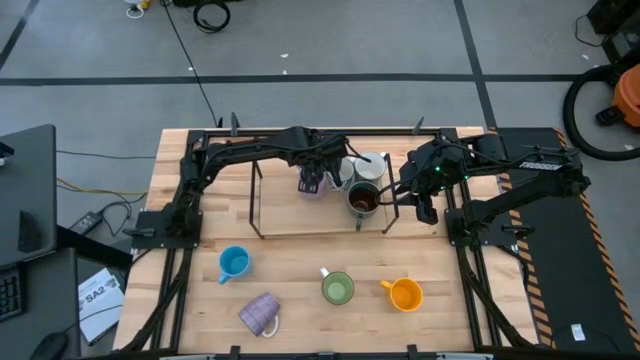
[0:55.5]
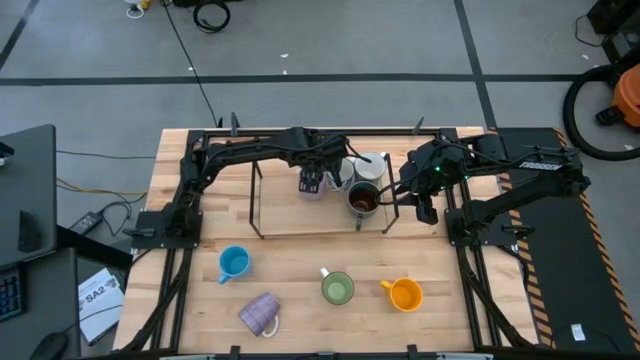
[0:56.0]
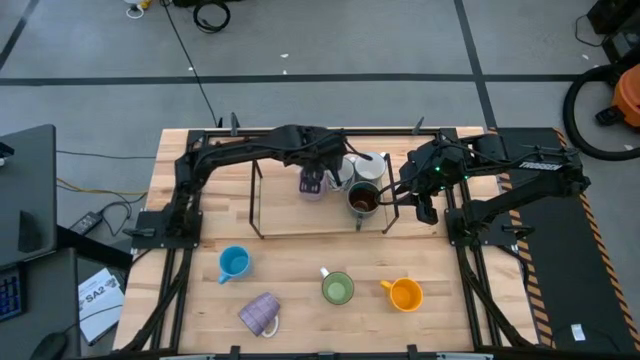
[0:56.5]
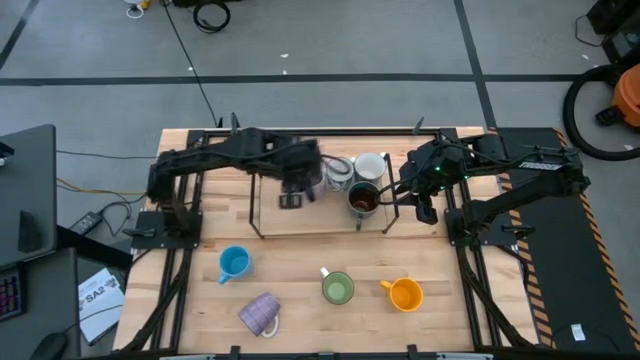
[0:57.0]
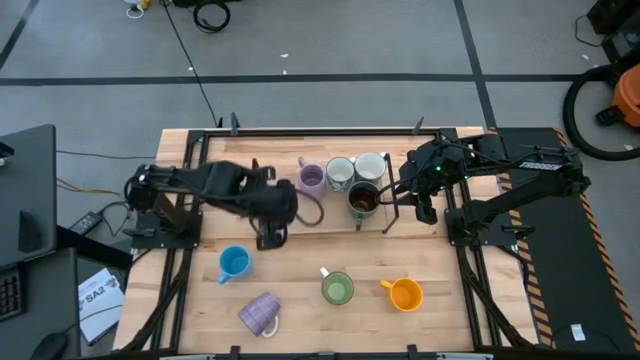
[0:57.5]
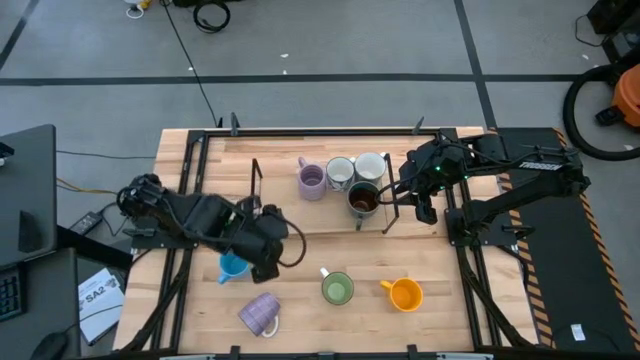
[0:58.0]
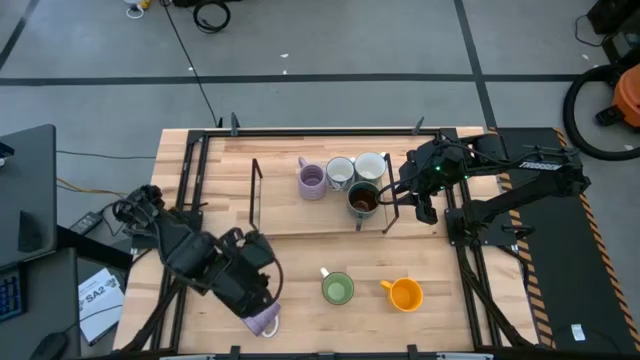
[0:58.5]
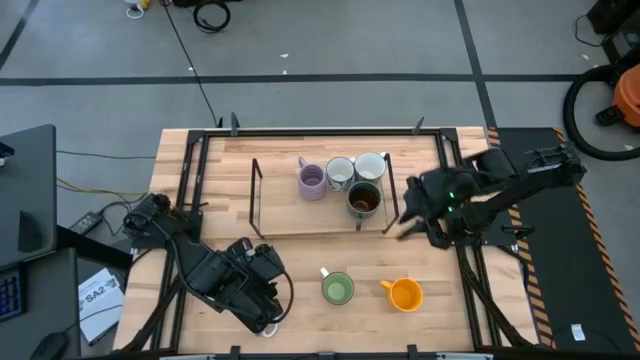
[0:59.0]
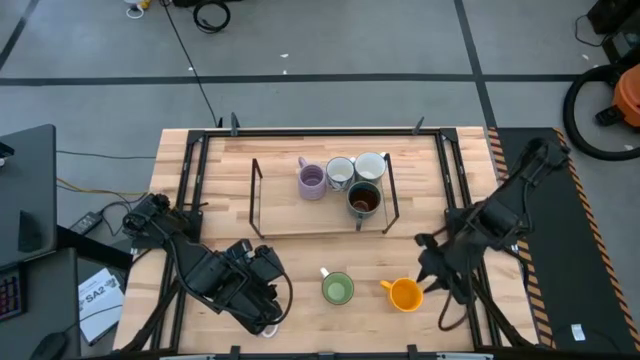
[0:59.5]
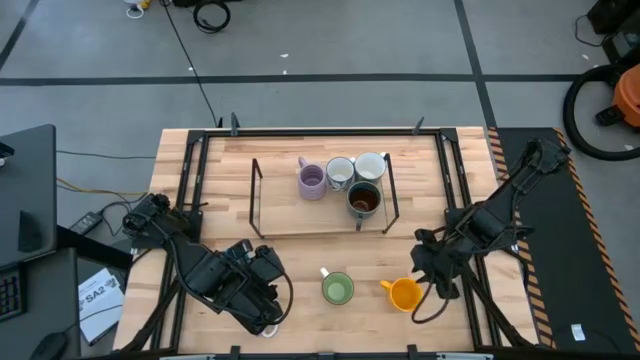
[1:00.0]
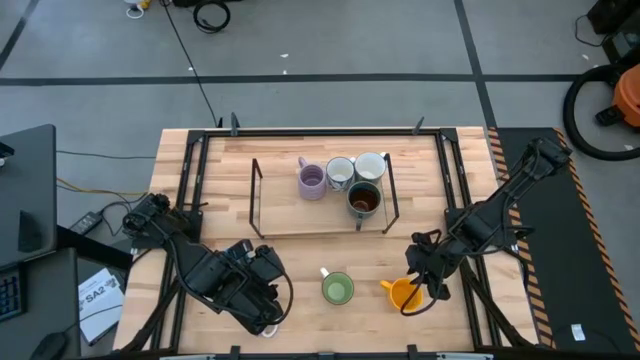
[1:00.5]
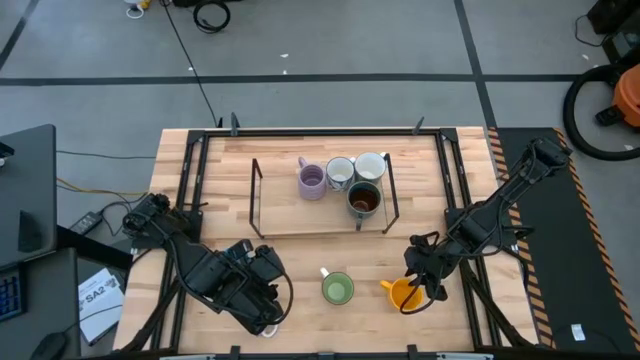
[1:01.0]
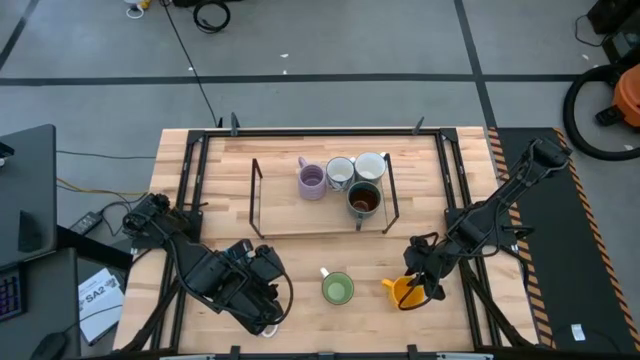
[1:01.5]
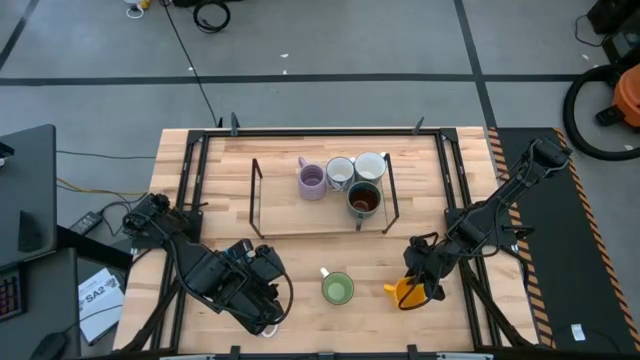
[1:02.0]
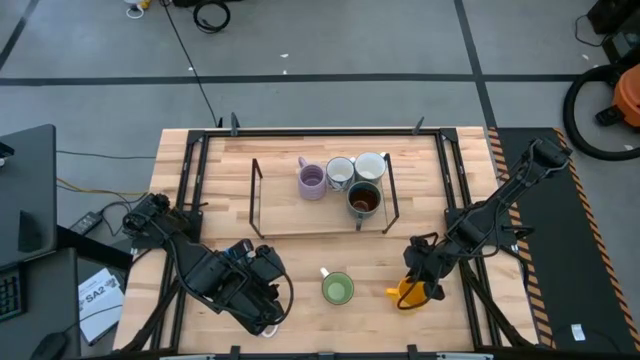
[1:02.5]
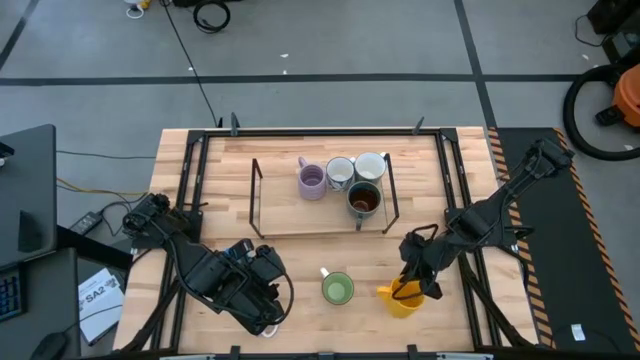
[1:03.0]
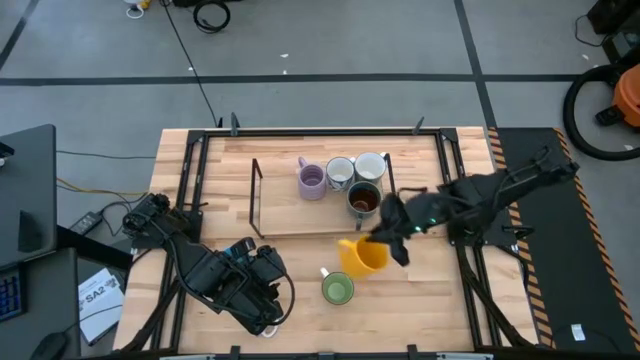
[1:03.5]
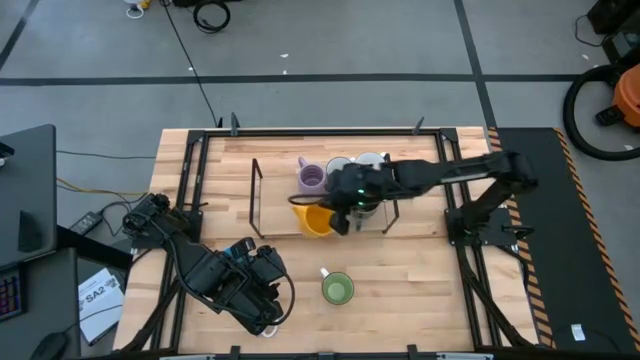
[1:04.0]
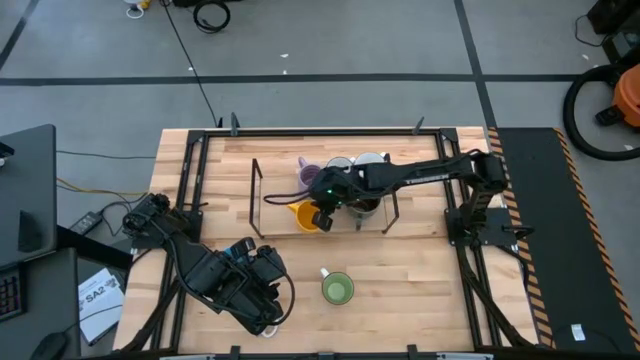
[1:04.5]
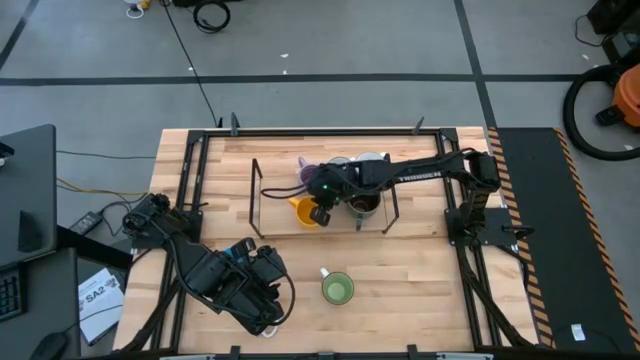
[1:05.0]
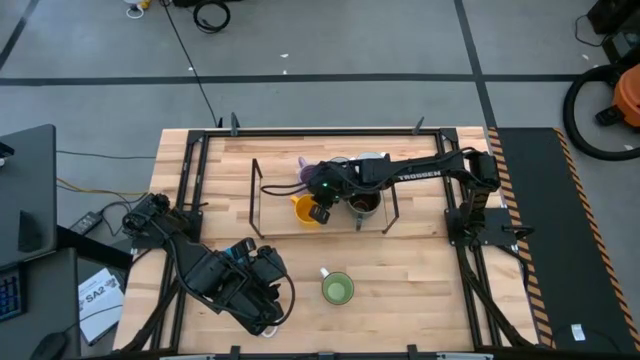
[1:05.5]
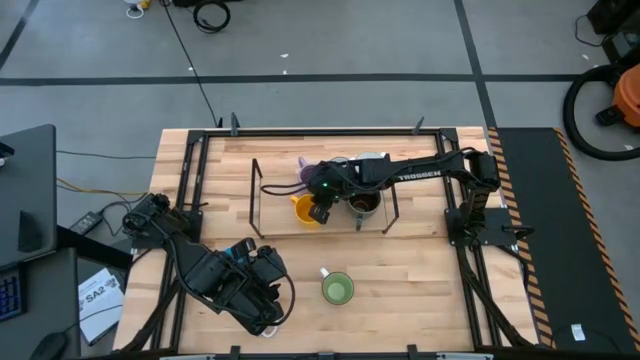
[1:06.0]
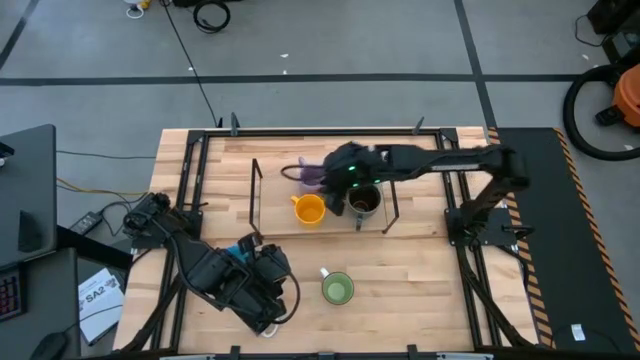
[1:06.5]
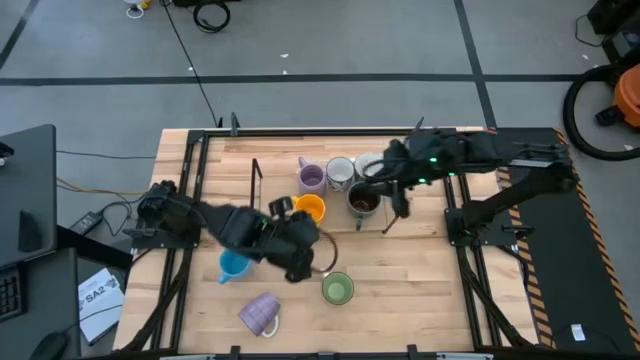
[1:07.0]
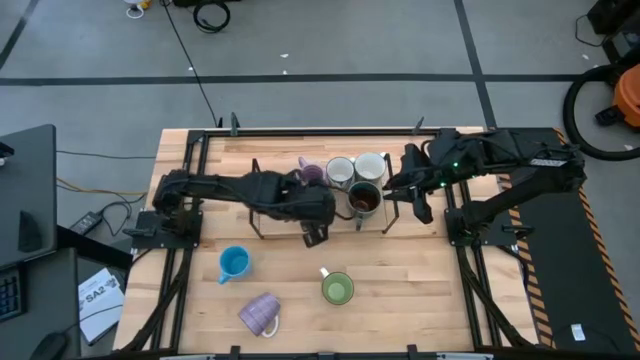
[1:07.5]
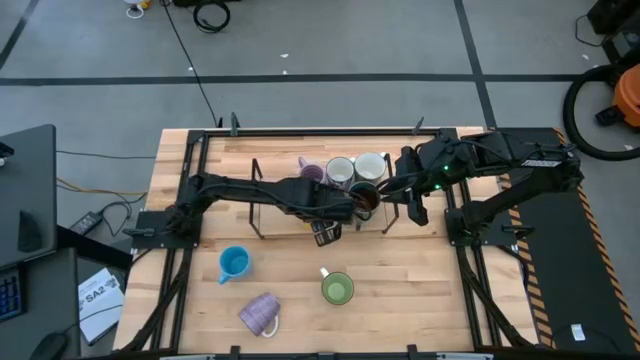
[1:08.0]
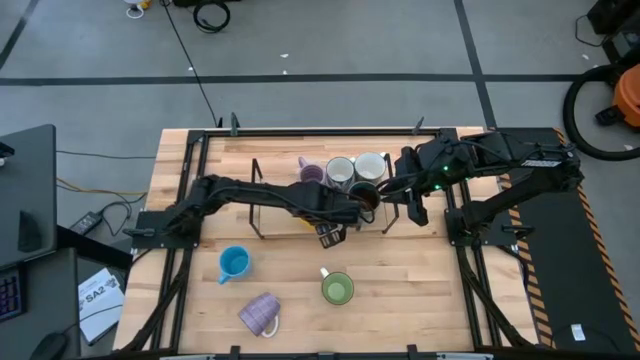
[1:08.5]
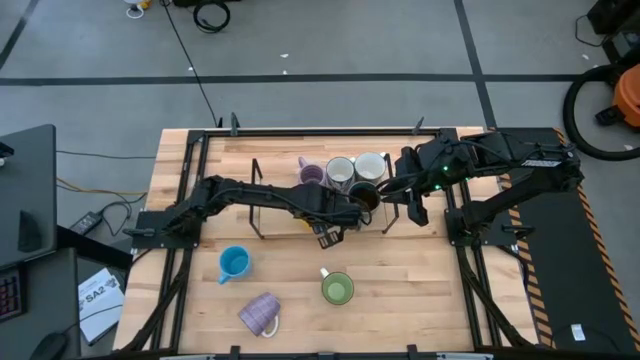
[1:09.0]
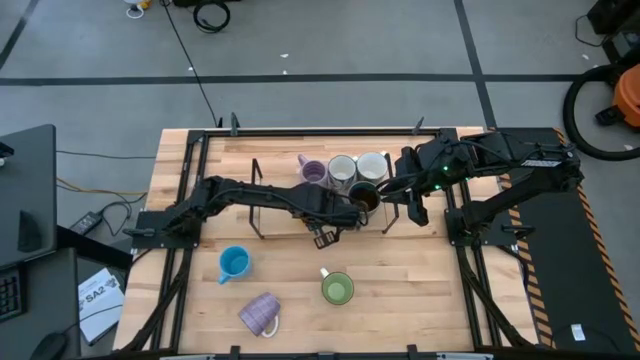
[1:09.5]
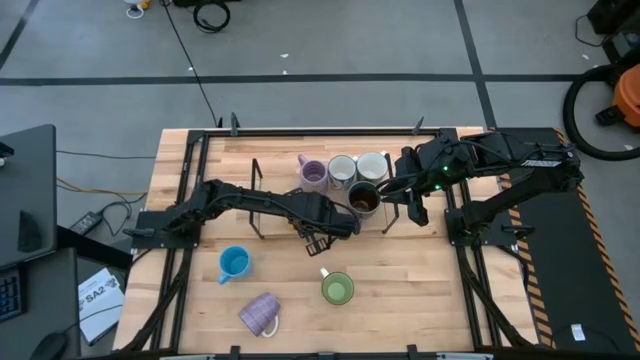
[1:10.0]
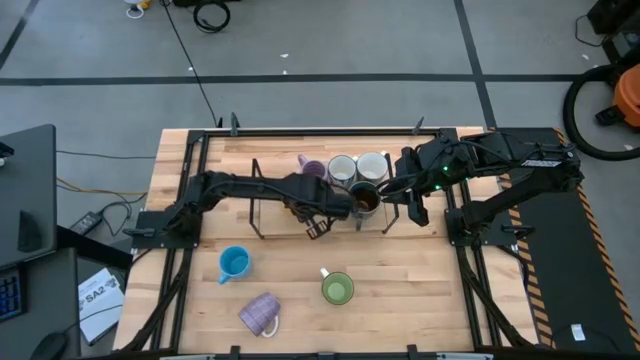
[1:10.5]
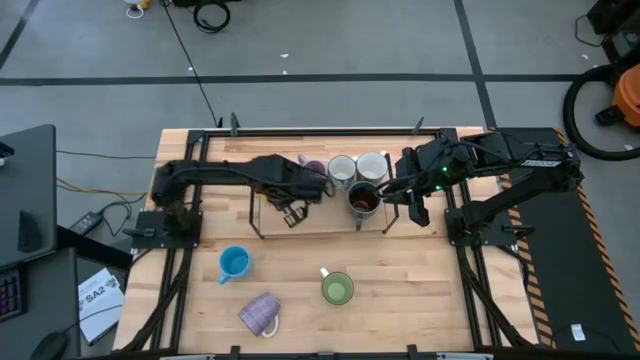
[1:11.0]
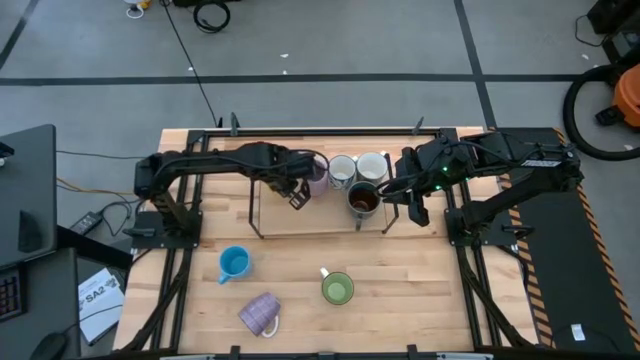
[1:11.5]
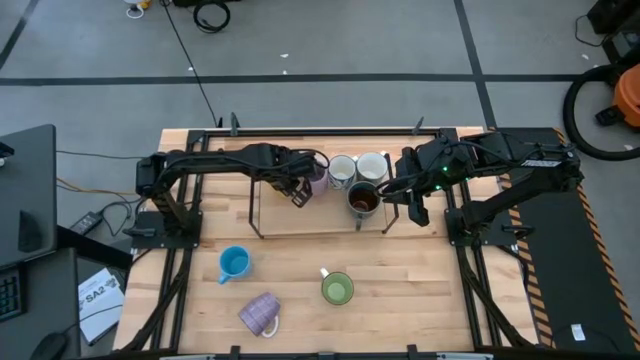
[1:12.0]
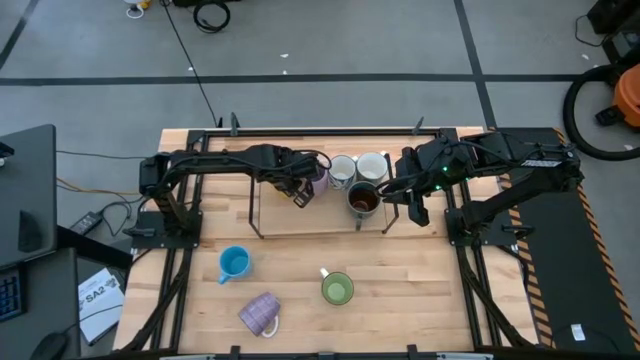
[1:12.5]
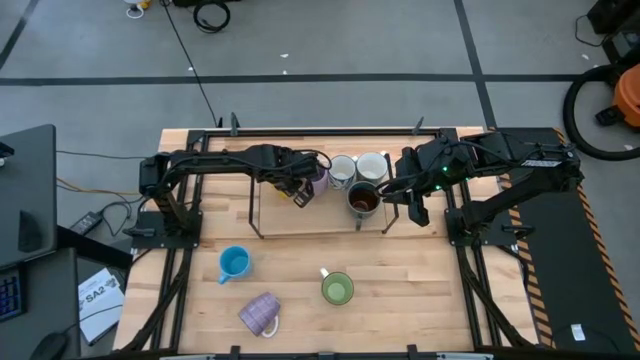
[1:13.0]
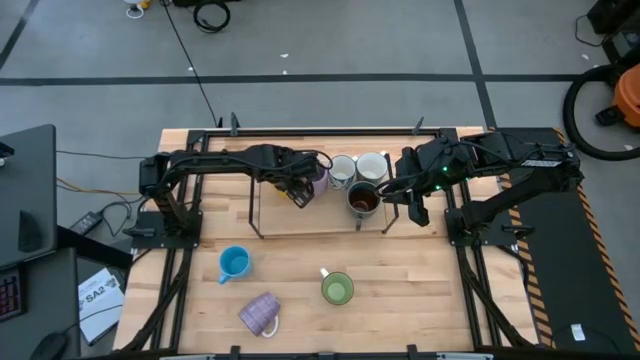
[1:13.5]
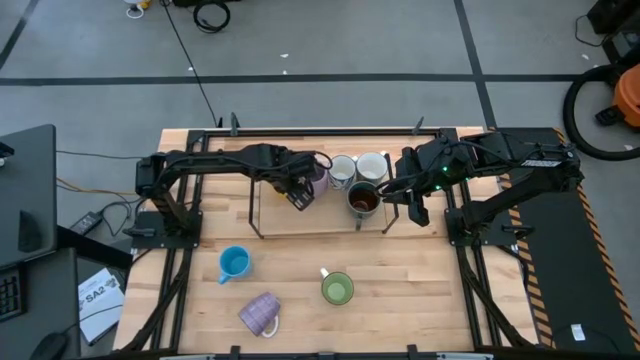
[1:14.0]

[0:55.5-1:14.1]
Task: Place coffee mugs
Put the yellow mug on the shelf
